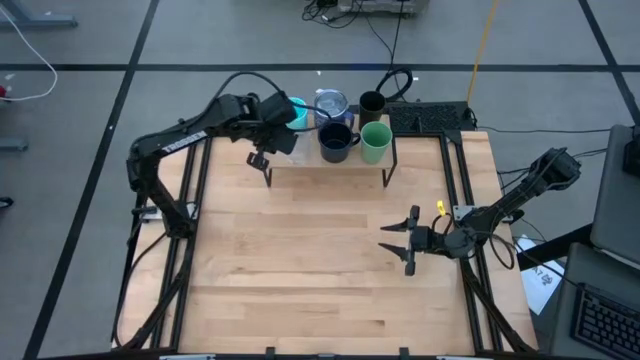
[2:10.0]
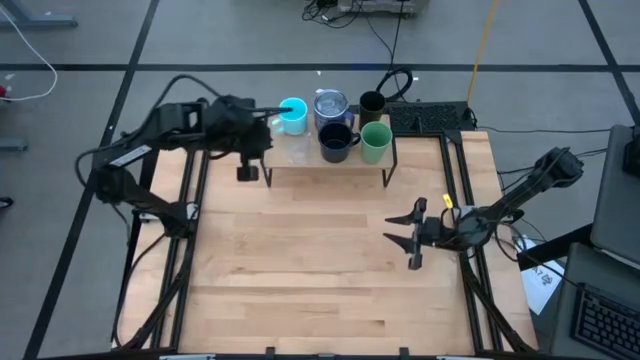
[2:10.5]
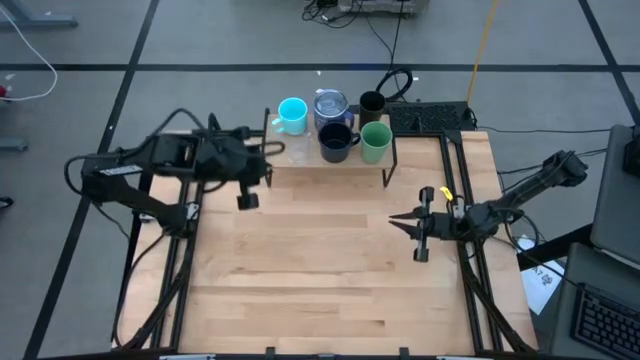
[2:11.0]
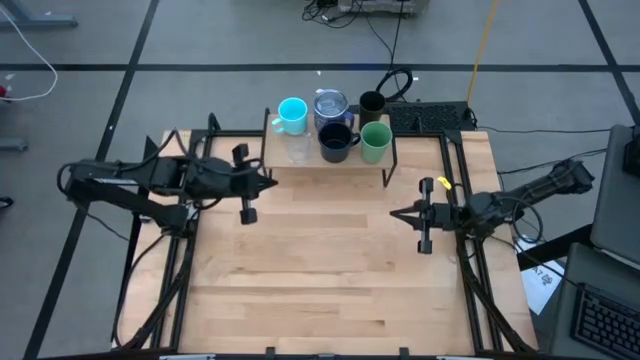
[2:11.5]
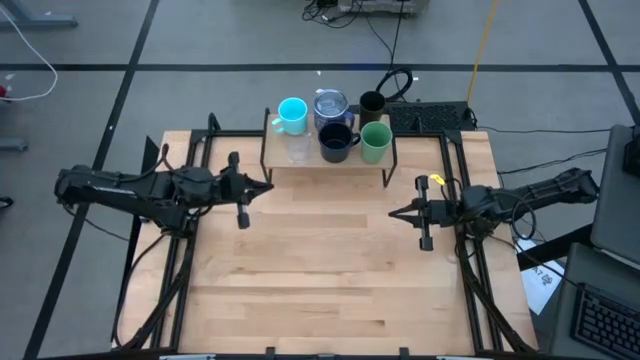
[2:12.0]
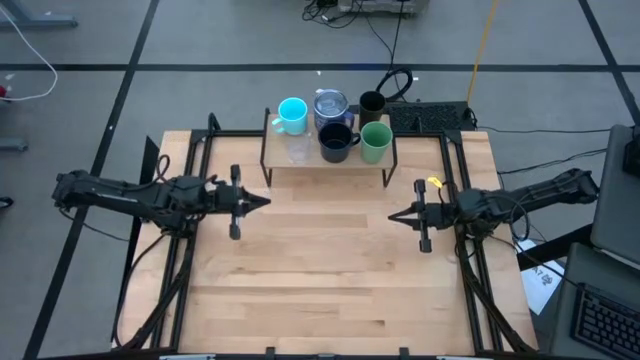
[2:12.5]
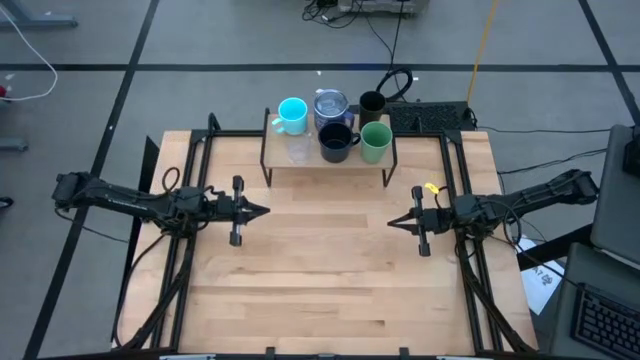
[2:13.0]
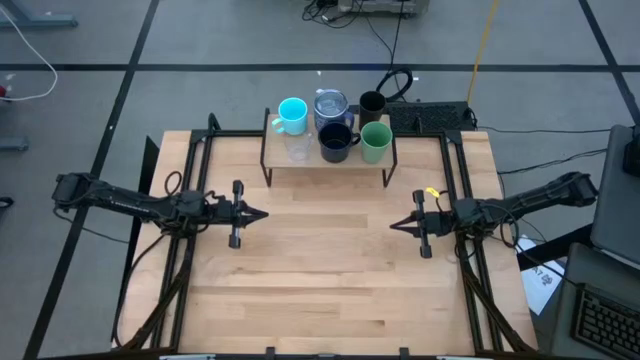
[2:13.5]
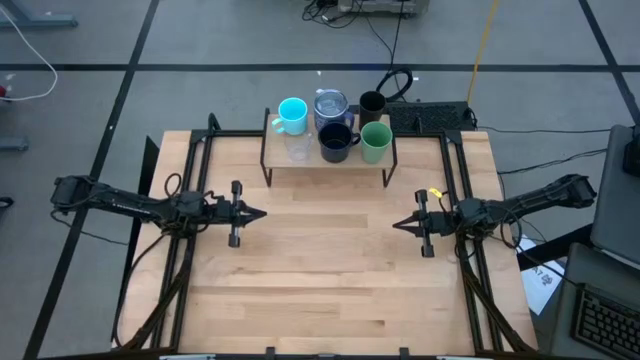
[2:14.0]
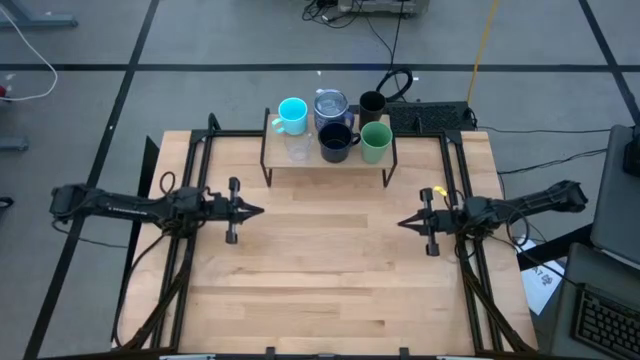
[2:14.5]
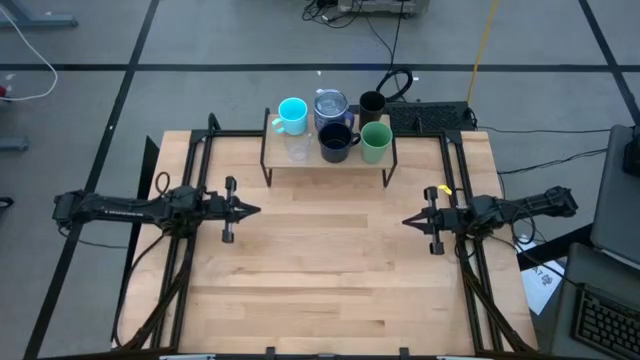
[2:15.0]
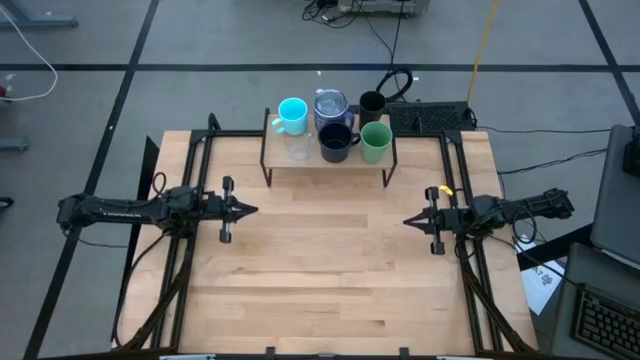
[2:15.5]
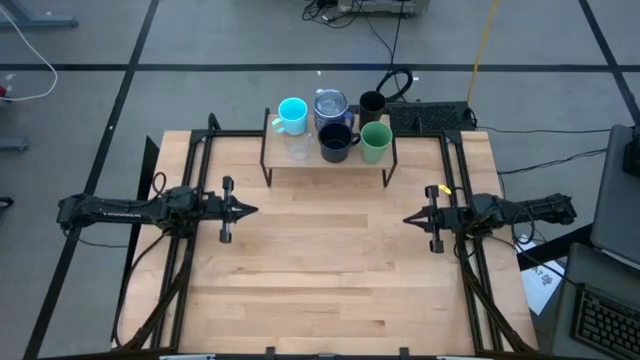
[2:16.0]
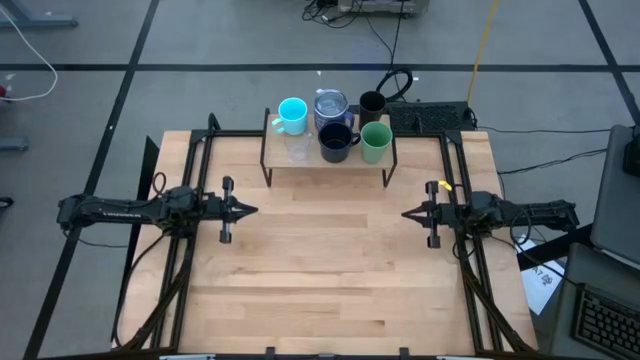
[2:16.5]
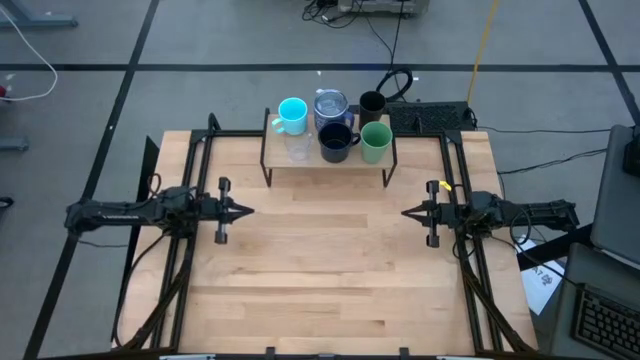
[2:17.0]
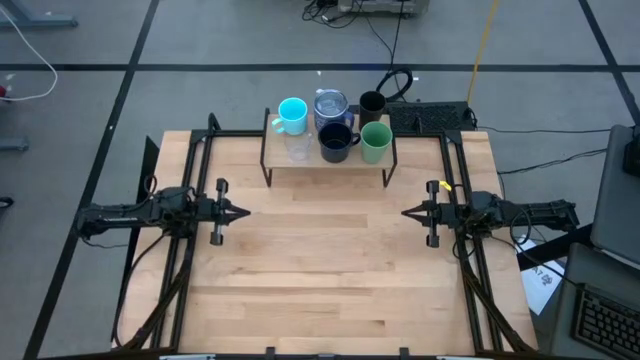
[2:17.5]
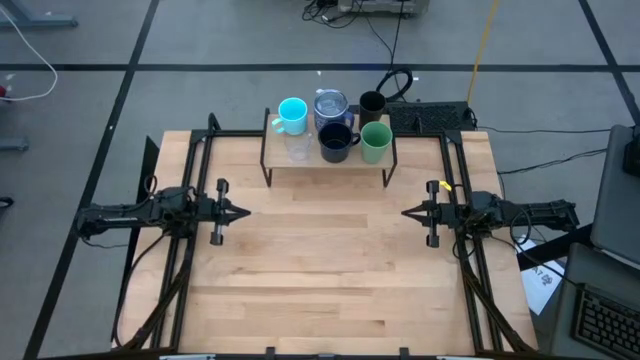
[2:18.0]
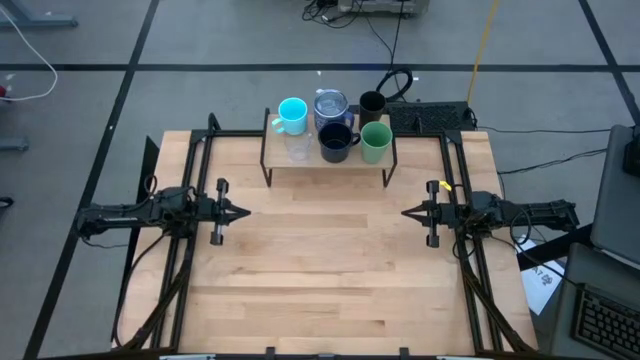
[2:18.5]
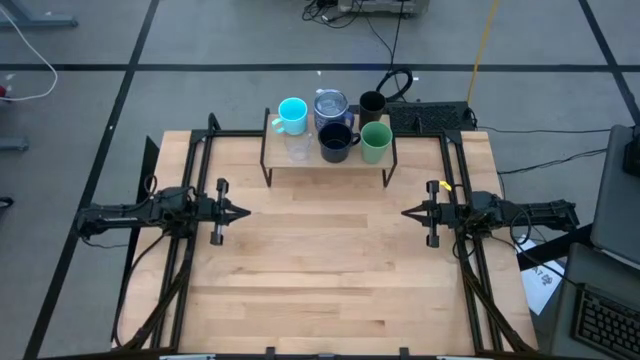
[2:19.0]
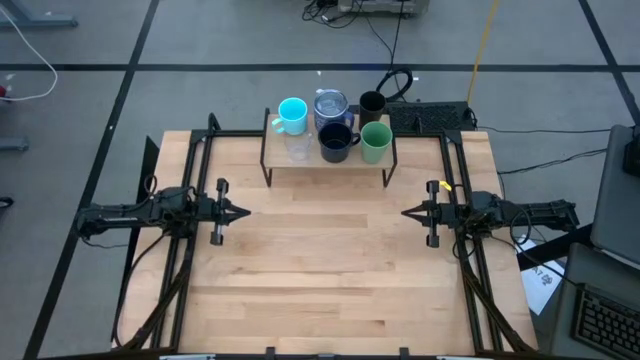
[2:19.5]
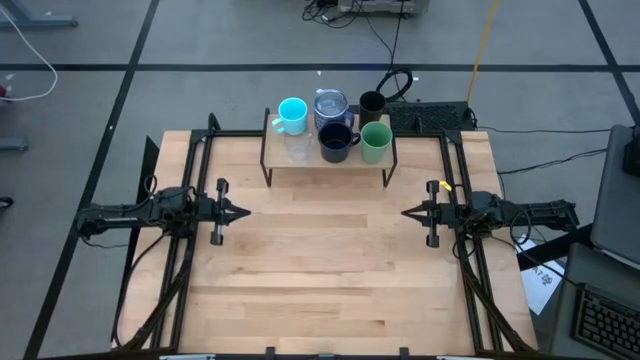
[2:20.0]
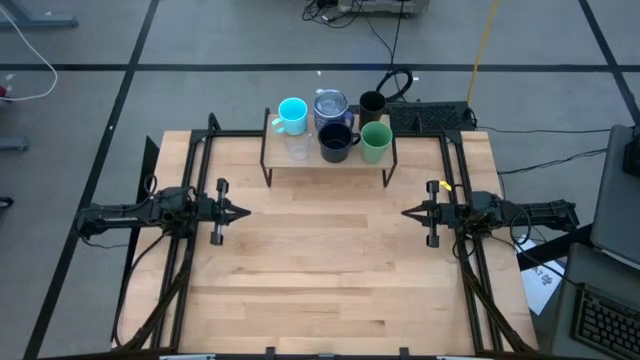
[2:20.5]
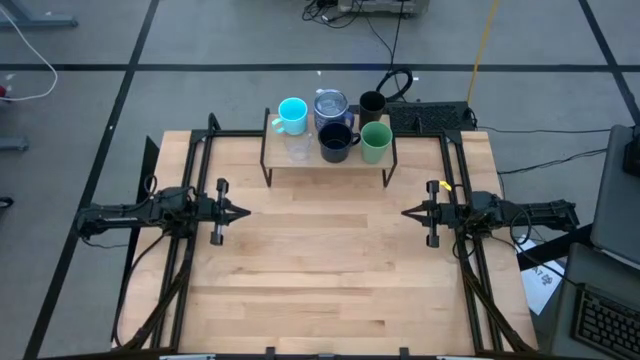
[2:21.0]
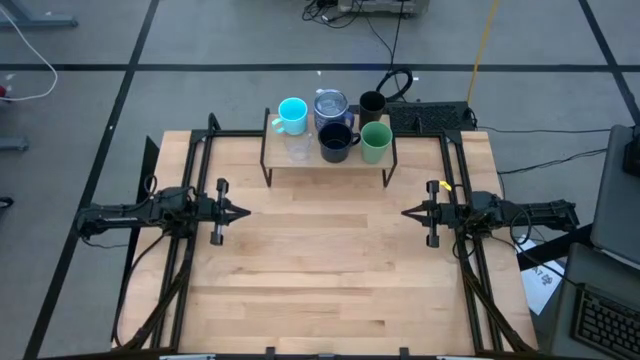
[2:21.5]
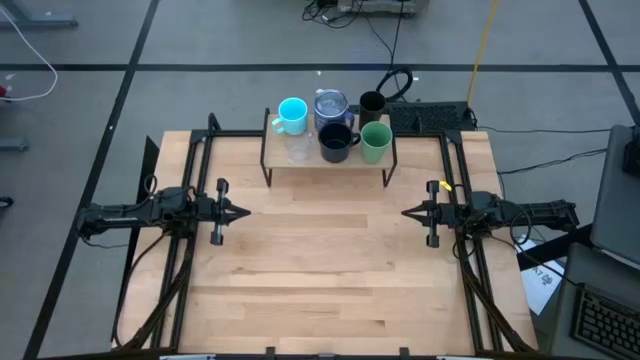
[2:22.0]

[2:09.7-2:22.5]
Task: Stack small to large cups/mugs on shelf
Return to Home Position

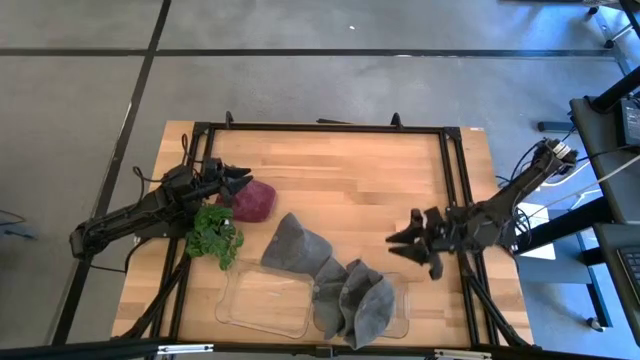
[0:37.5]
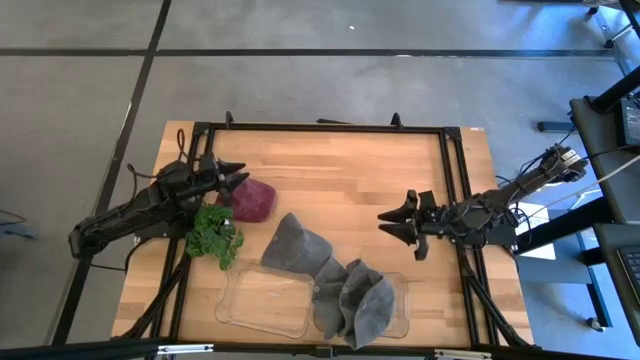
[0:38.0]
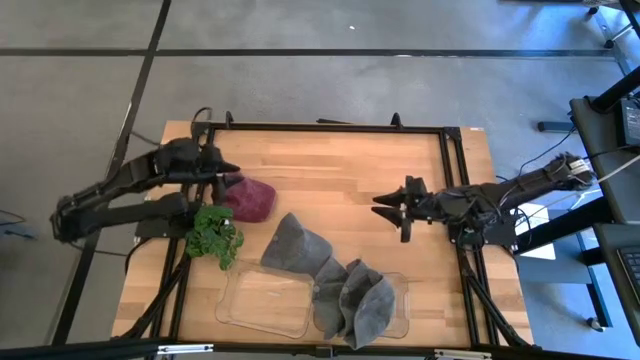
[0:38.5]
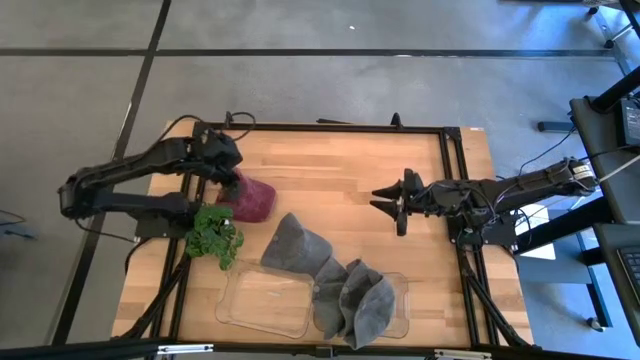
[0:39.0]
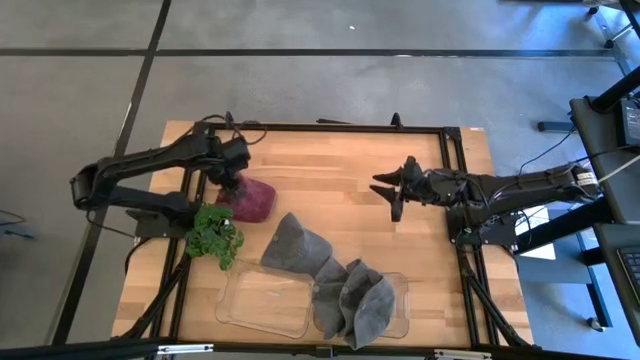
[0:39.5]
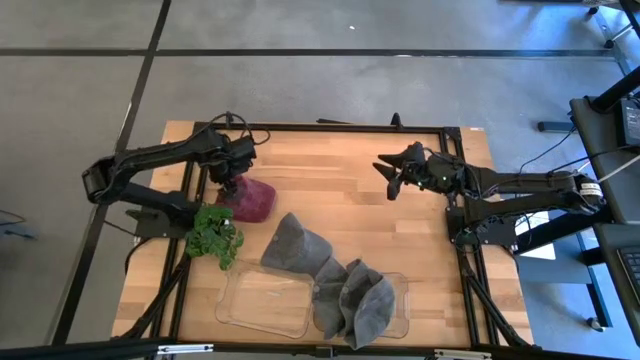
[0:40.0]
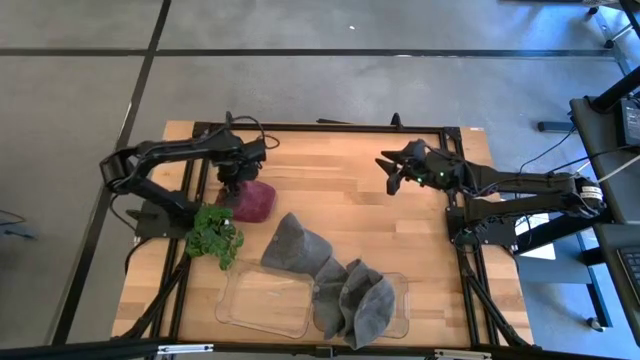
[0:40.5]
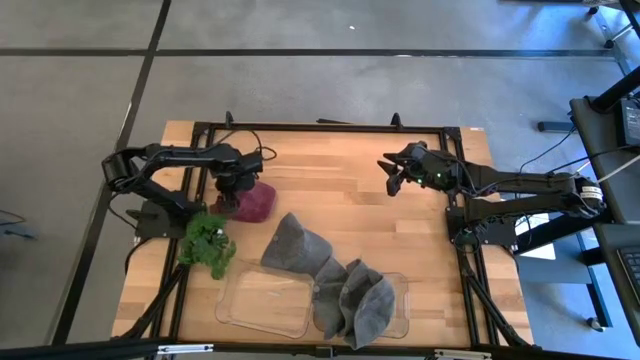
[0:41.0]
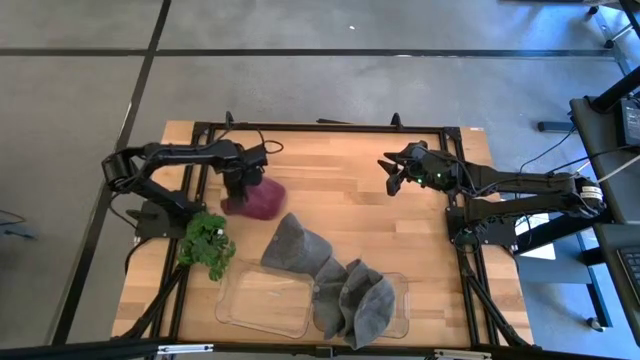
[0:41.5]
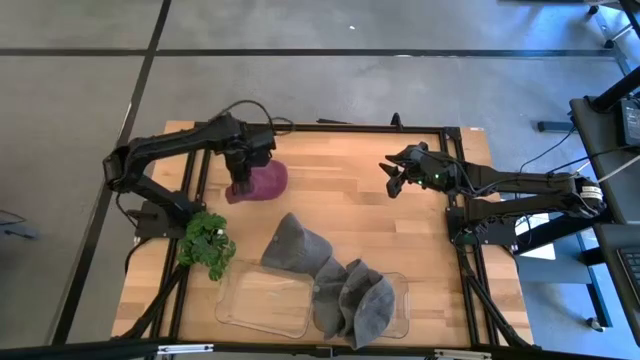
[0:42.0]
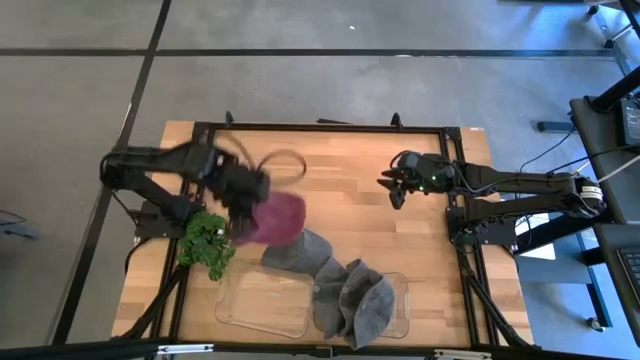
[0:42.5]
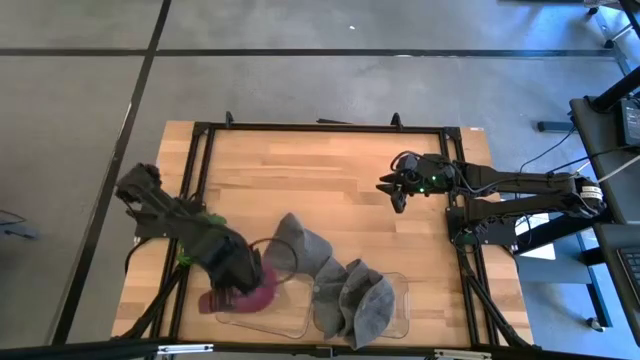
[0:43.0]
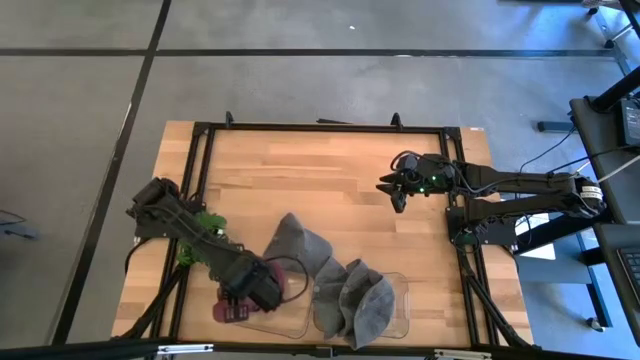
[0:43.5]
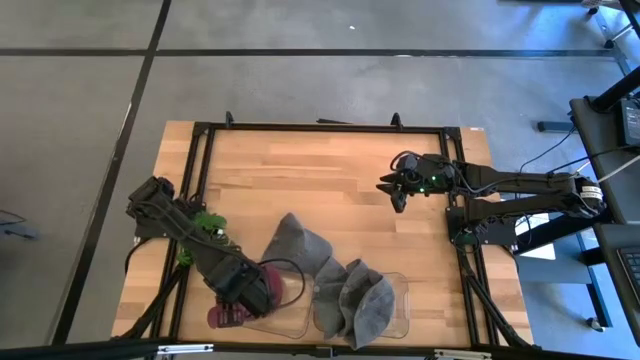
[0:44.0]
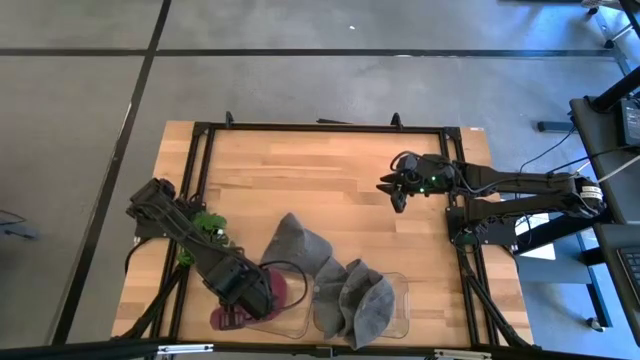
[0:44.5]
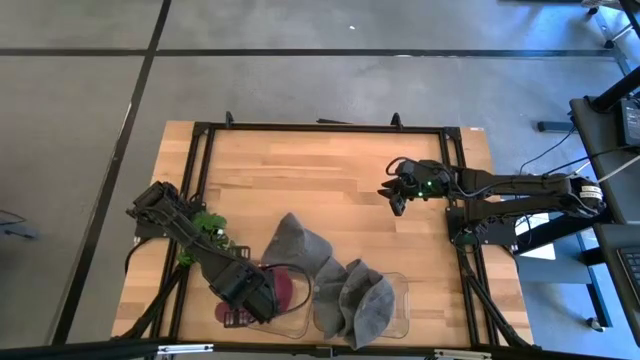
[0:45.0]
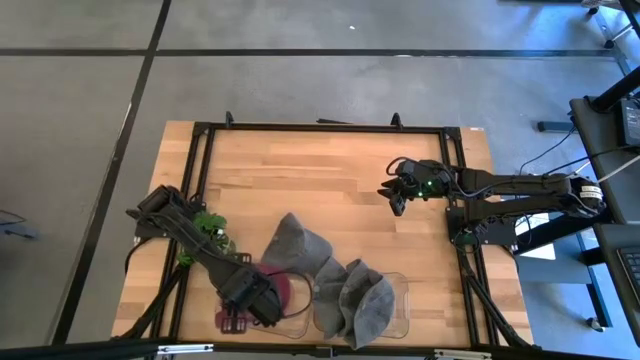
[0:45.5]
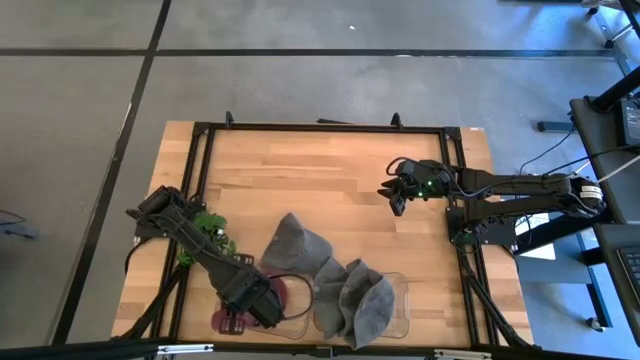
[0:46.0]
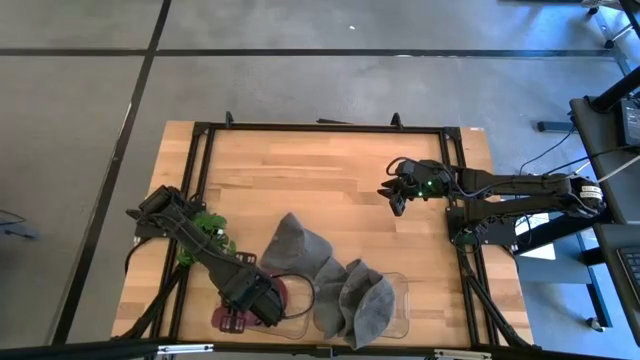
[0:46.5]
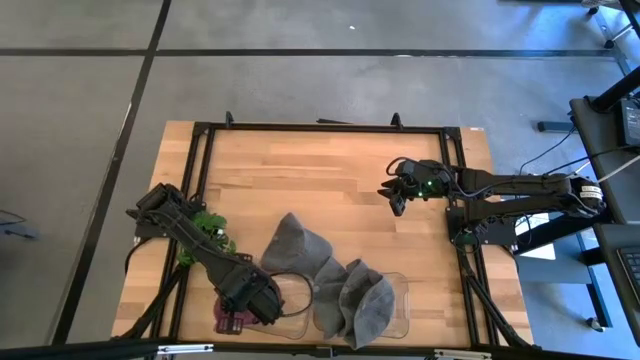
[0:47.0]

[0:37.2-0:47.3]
Task: Pick & Place hat
Put the red cap into the left transparent bin
